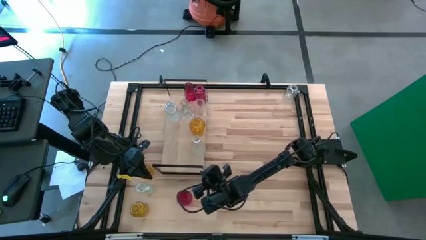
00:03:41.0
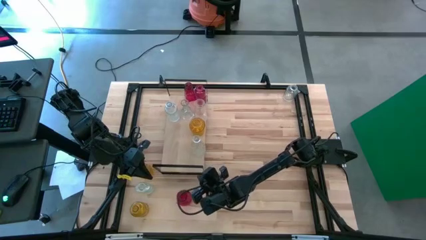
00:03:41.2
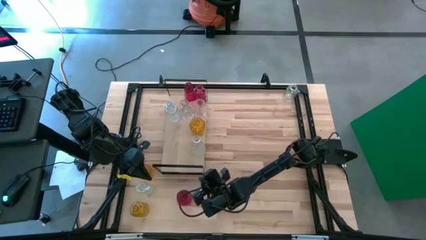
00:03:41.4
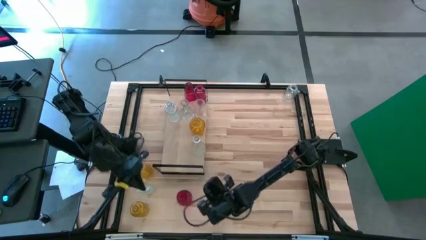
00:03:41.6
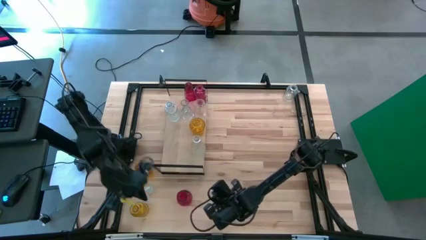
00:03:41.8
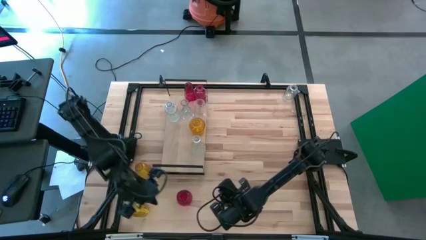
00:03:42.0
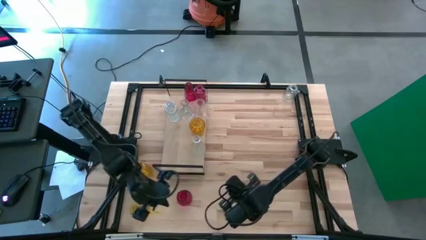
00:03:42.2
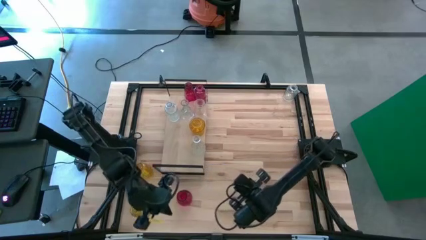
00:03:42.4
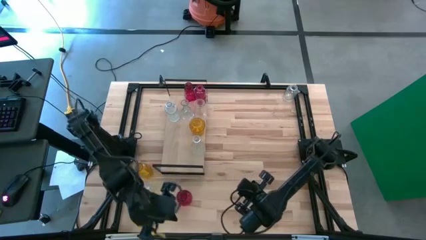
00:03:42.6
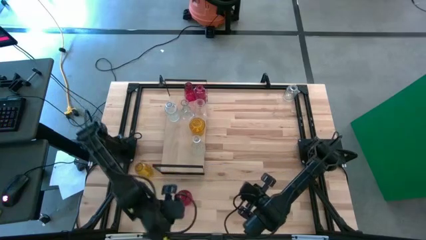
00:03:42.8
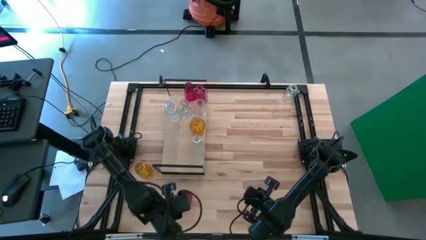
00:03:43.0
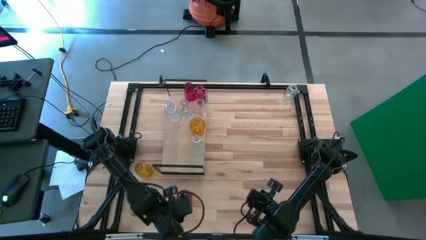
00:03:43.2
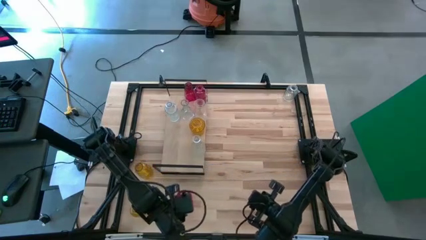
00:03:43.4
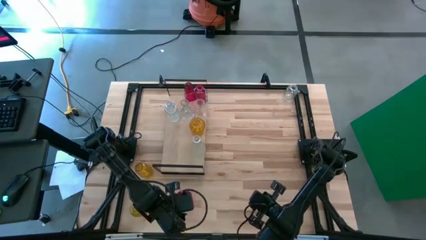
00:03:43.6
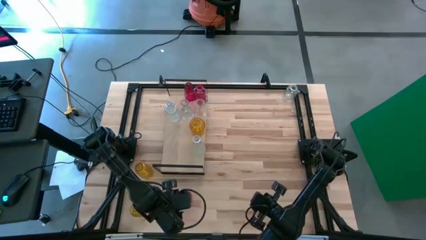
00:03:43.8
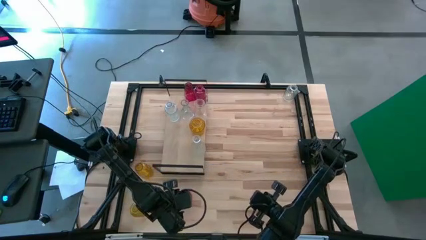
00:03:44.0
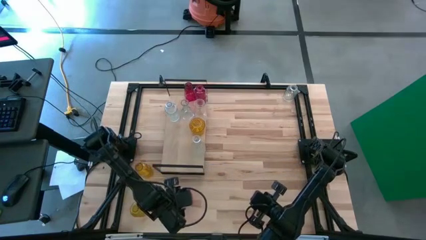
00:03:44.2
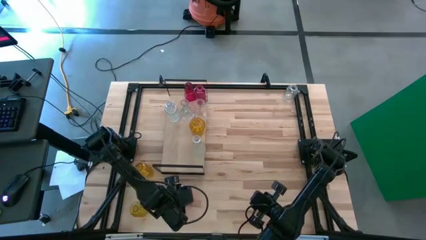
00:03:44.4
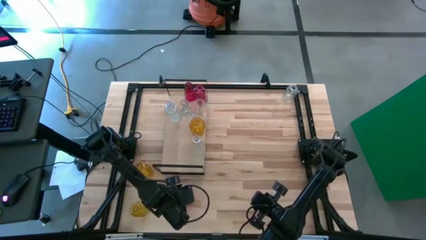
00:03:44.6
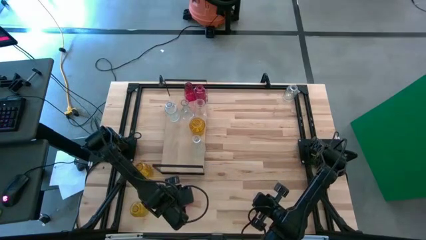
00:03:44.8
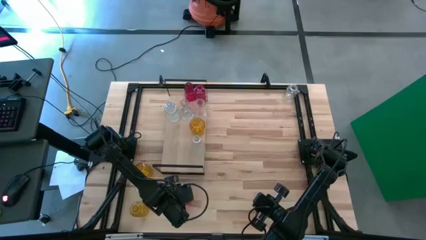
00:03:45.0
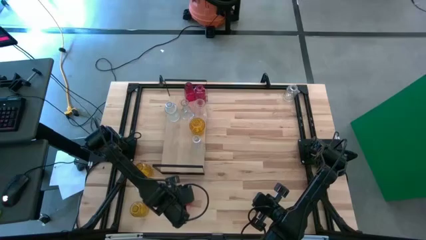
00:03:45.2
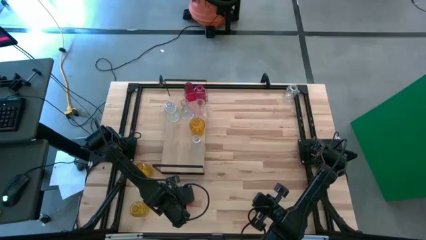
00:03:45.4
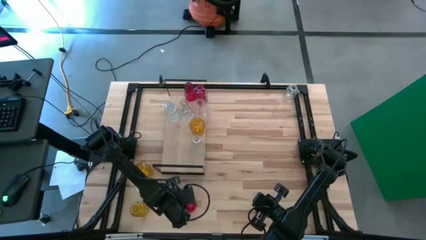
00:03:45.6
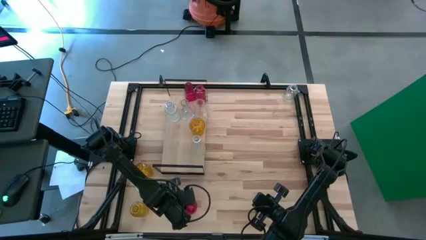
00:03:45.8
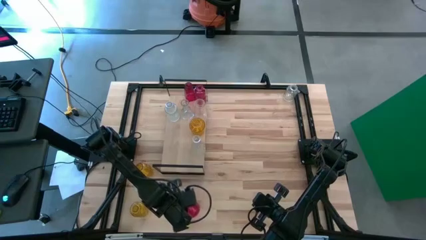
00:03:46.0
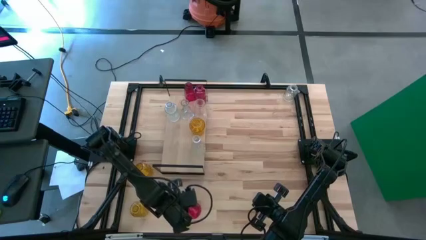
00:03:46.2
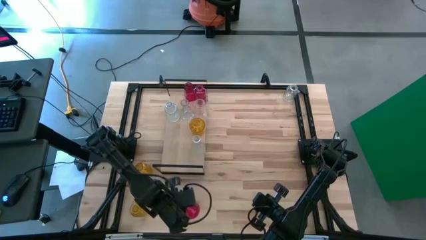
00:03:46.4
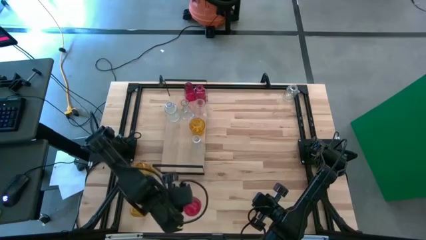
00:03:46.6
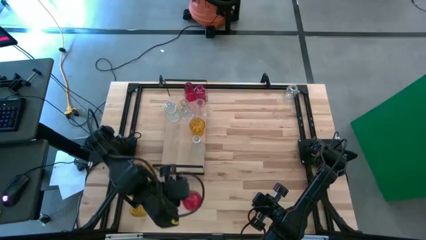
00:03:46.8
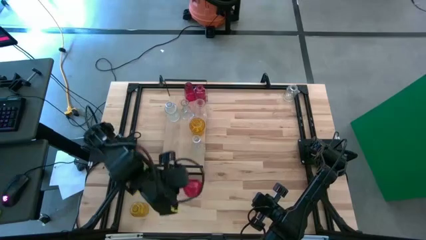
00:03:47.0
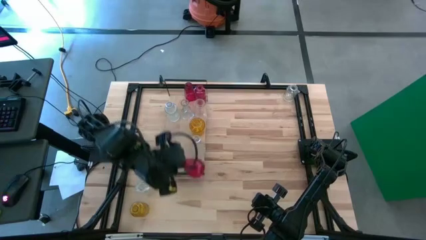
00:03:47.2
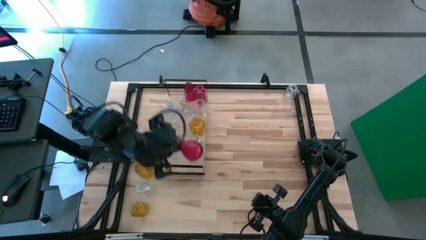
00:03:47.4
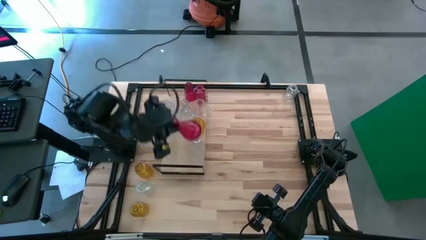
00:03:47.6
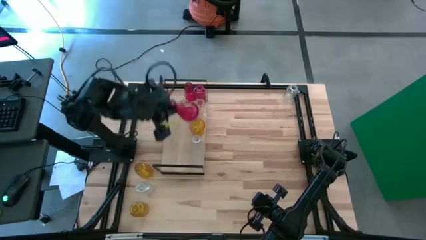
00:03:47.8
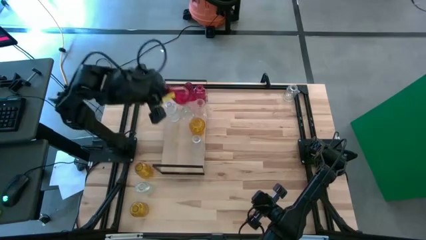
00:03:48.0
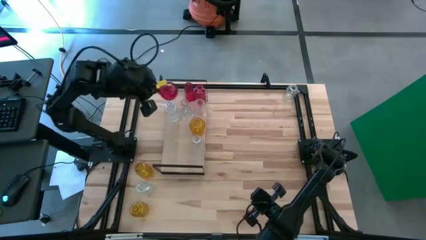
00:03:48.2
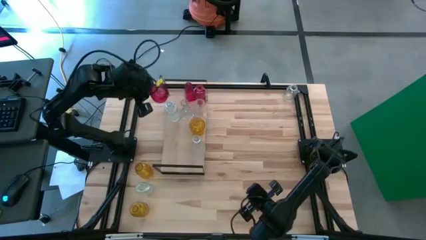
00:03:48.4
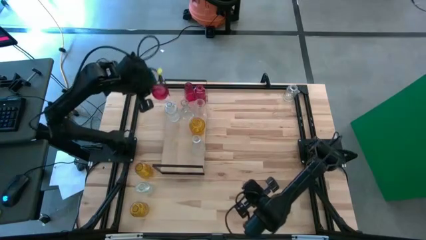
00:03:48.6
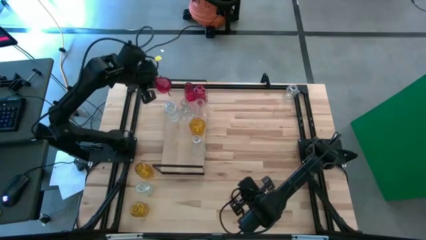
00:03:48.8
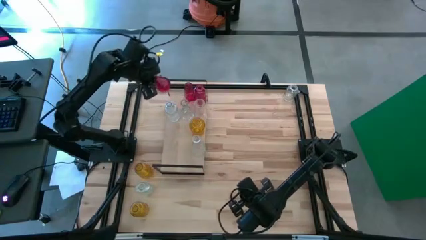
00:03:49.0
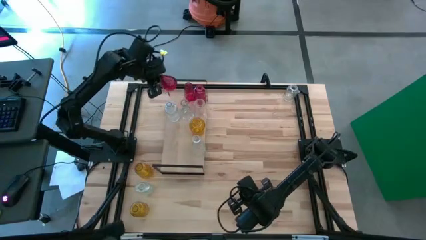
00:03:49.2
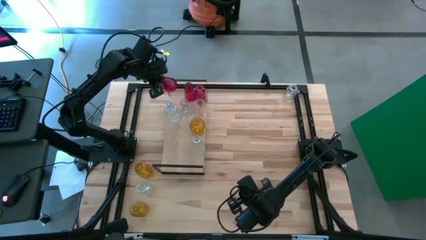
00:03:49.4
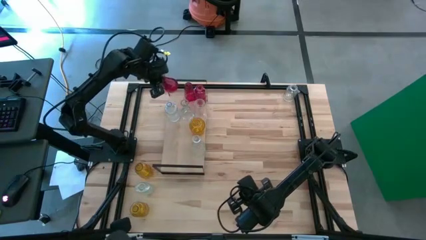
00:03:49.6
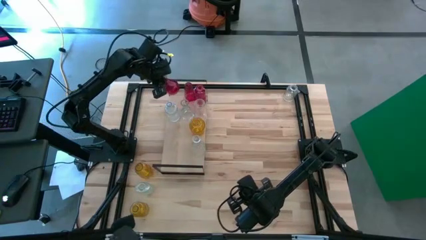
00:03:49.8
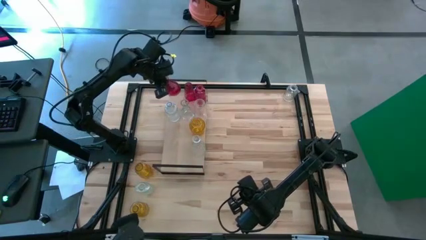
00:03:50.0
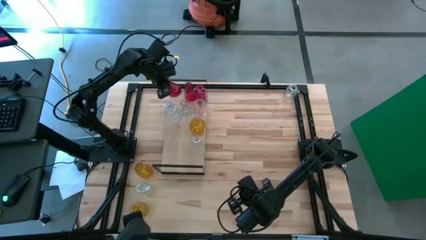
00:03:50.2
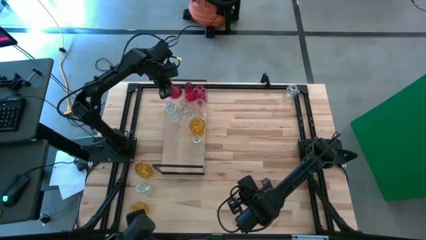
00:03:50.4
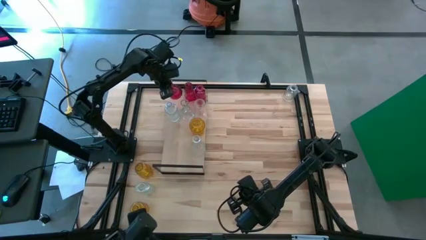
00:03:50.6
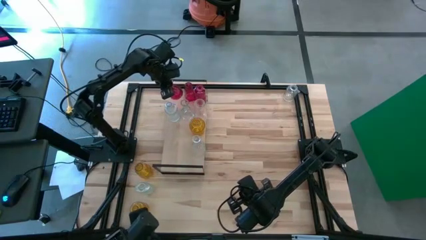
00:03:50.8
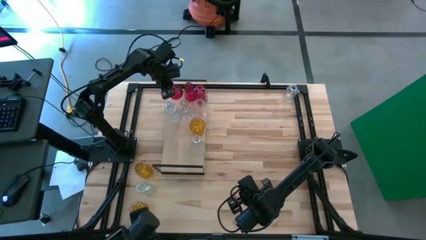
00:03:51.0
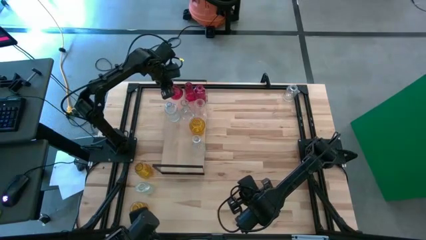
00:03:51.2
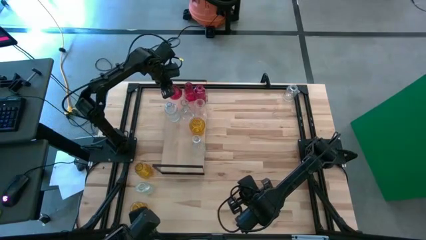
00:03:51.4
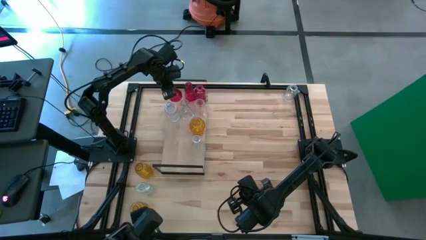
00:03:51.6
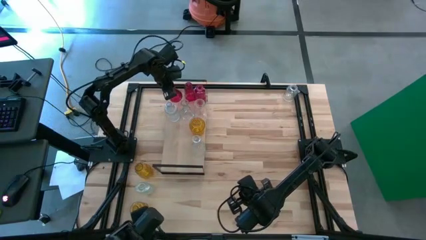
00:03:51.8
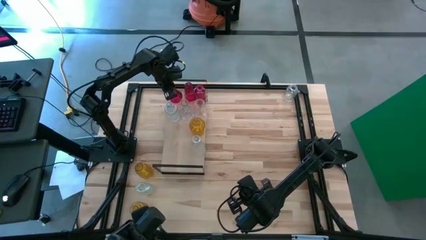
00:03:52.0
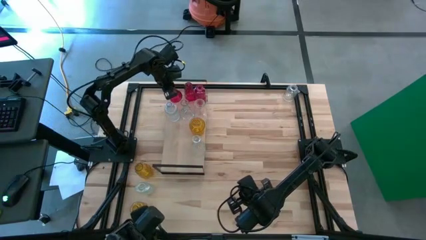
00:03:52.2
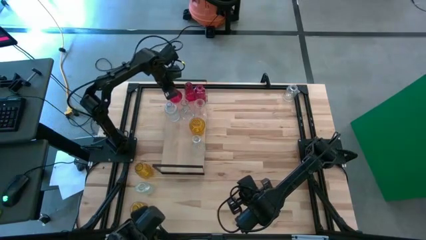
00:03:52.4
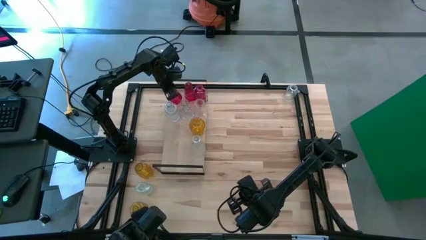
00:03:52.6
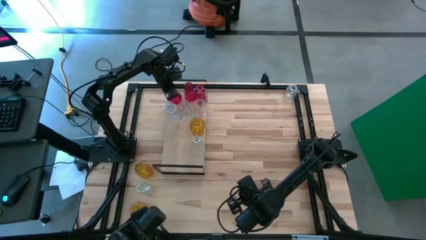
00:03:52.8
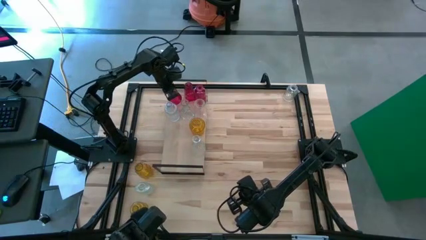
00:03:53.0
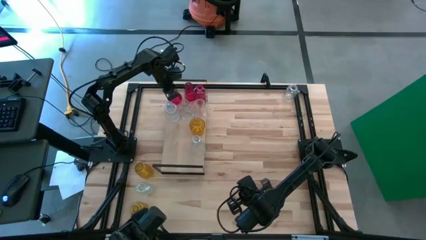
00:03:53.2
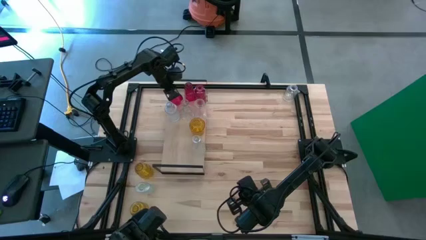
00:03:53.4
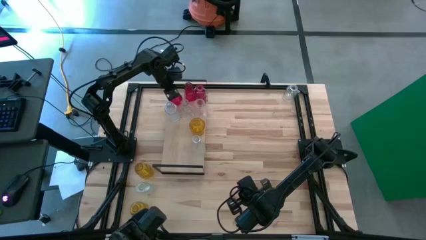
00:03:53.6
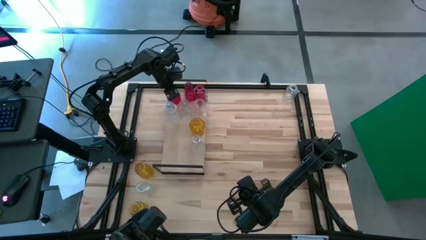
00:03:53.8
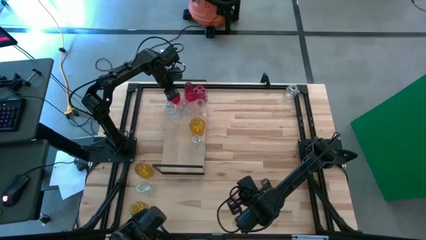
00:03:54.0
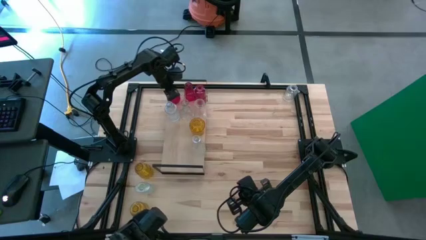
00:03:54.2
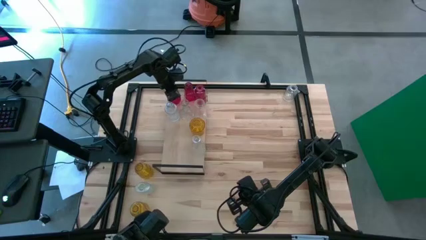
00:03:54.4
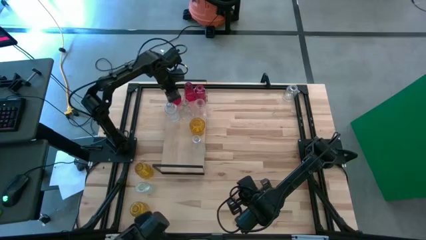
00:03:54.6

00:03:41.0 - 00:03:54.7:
Task: sort vases onto shelf
Put the red vase on the shelf aligned with the other red vase

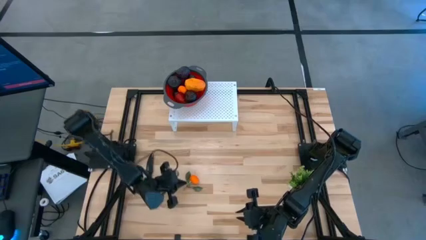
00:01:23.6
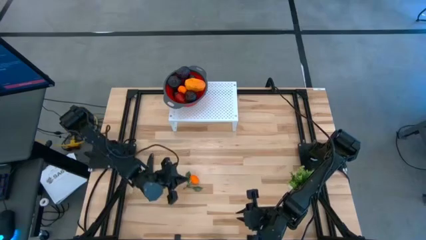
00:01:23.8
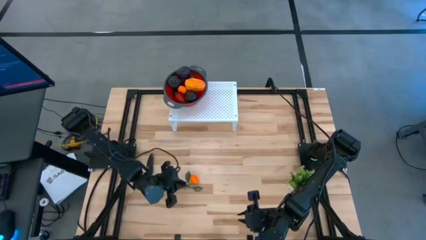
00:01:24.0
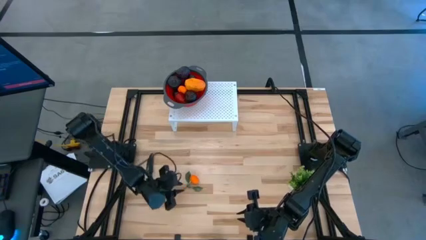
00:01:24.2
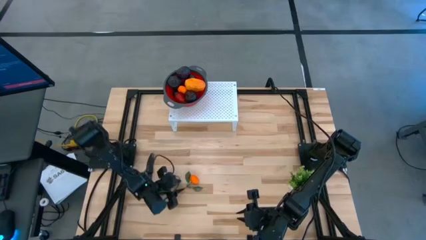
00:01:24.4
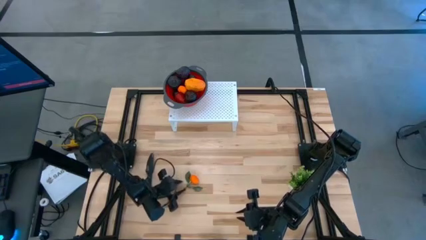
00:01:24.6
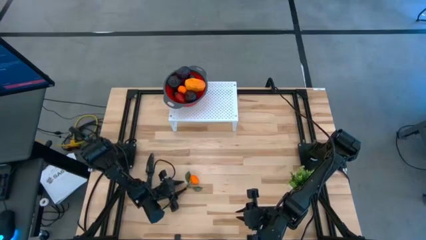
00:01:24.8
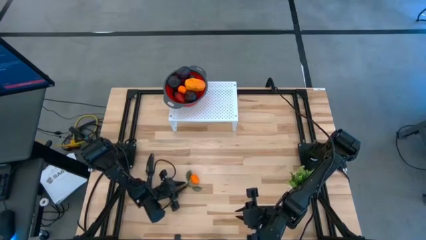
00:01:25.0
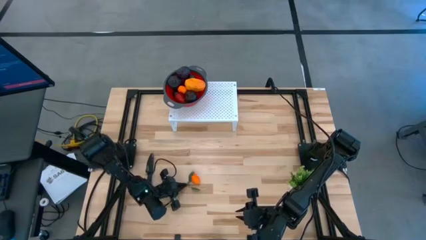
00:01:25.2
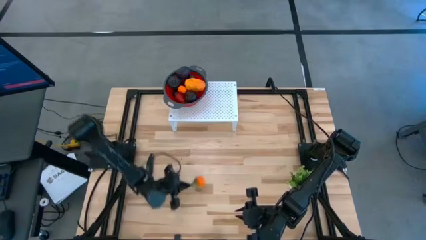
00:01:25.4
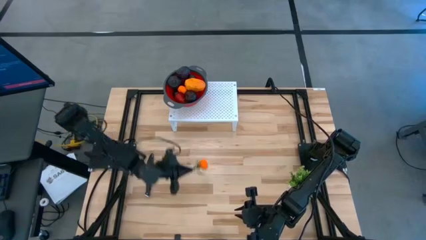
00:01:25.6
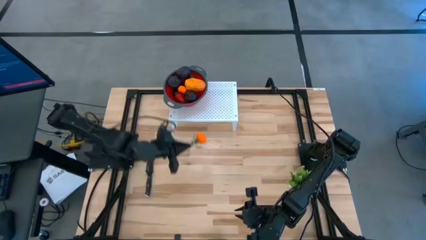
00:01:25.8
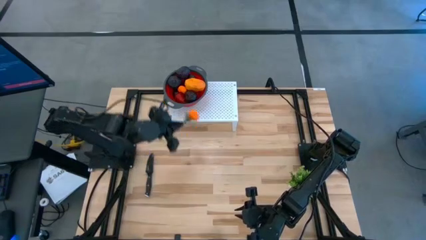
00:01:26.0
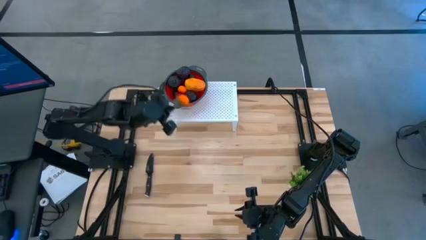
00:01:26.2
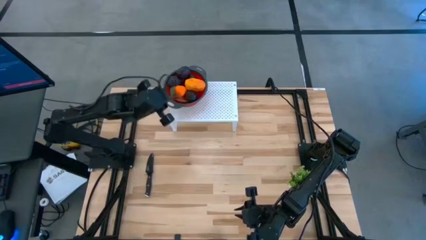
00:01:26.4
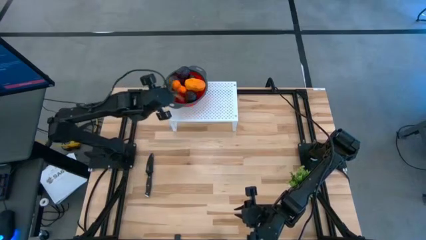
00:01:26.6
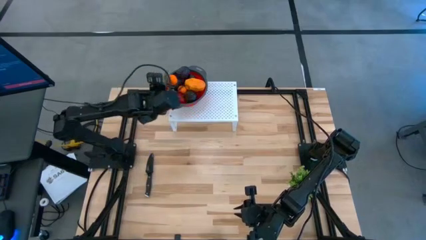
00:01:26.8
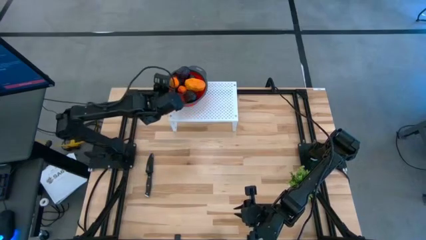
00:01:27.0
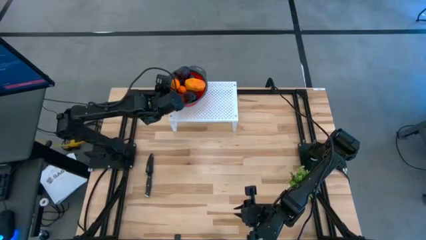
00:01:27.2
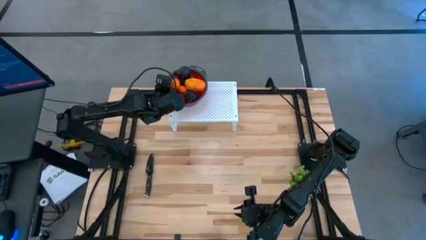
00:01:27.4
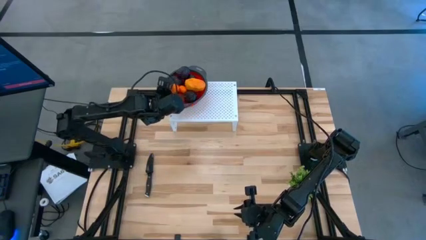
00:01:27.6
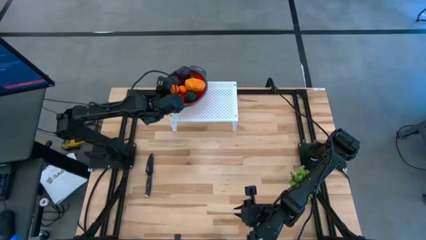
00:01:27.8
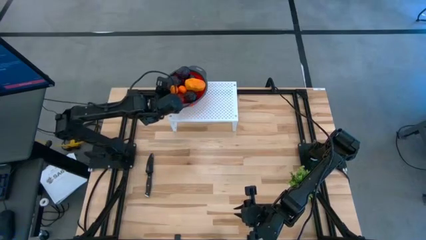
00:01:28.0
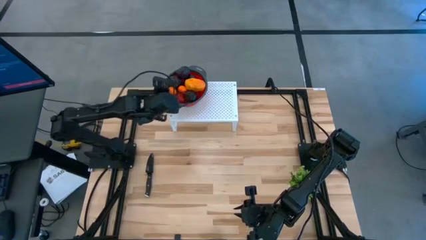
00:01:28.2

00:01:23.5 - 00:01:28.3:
Task: Pick & Place Fruit
Put the orange into the red strainer bowl on the shelf
